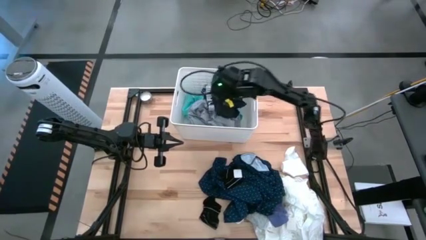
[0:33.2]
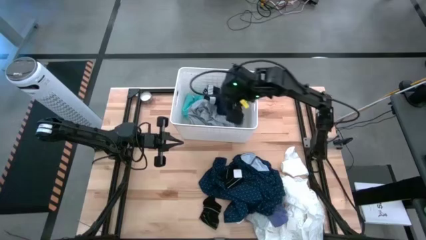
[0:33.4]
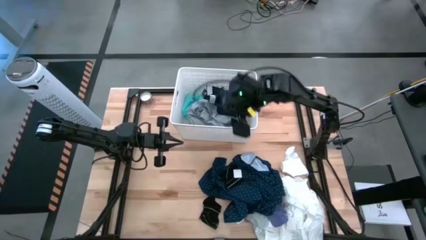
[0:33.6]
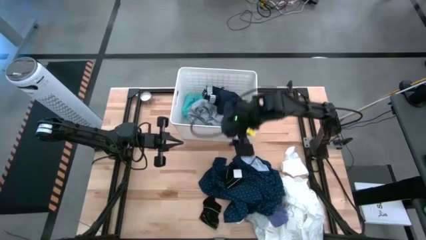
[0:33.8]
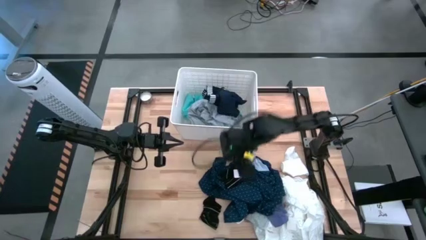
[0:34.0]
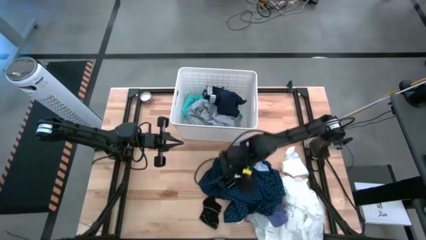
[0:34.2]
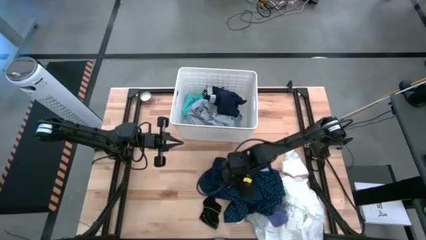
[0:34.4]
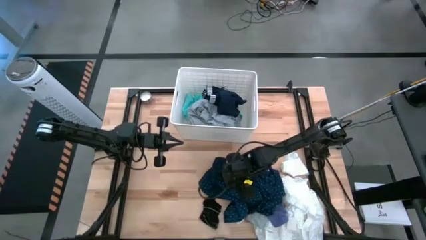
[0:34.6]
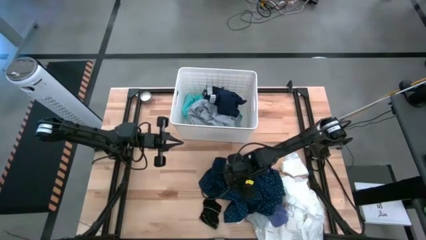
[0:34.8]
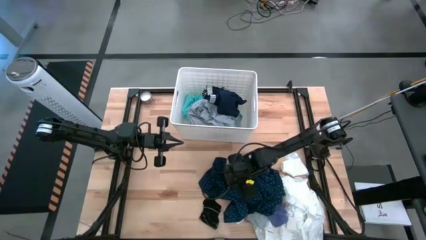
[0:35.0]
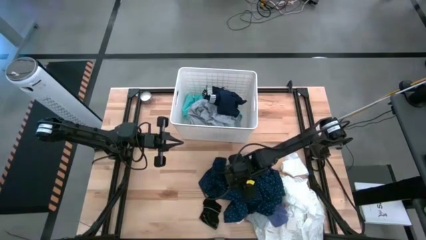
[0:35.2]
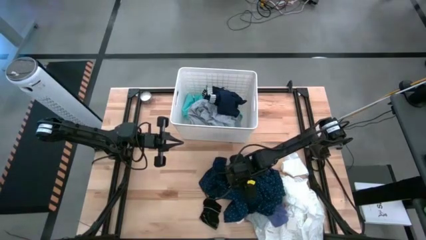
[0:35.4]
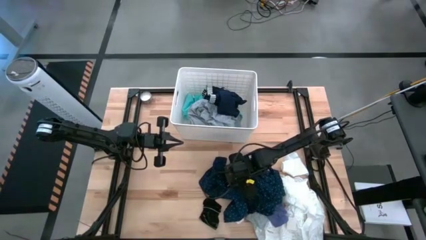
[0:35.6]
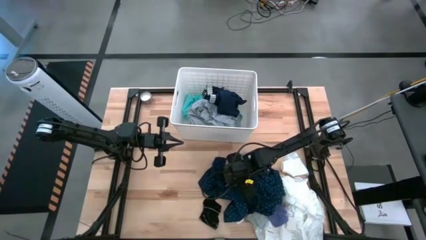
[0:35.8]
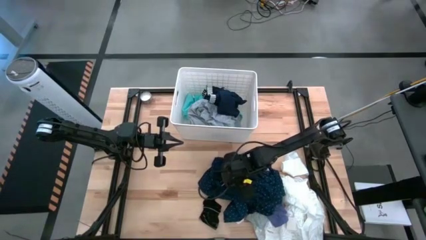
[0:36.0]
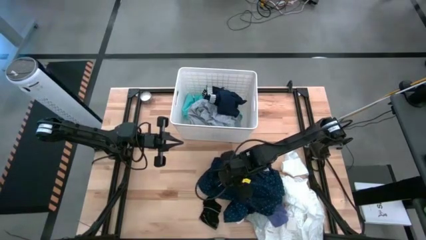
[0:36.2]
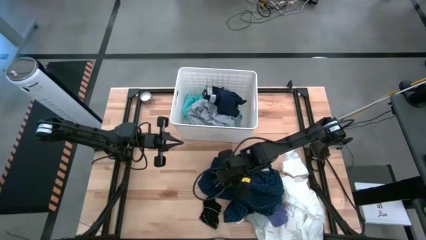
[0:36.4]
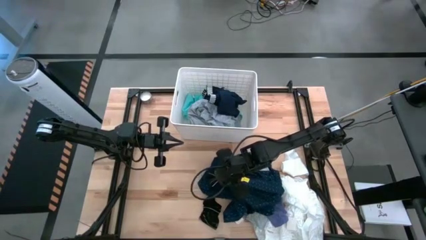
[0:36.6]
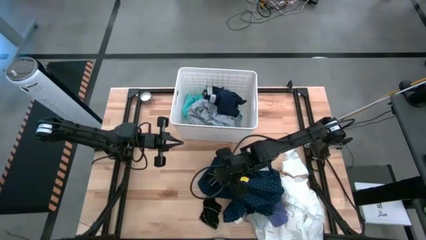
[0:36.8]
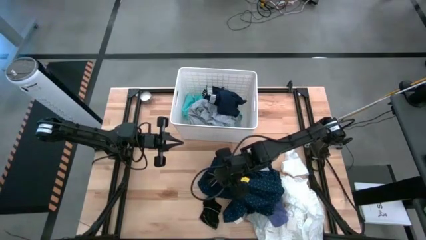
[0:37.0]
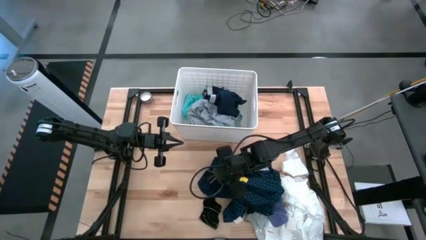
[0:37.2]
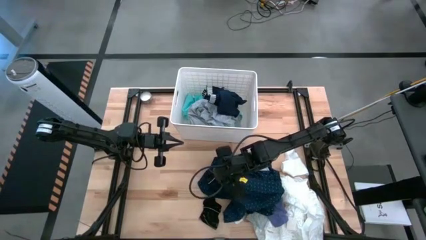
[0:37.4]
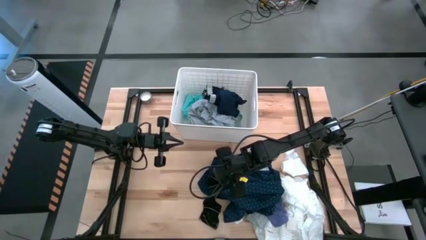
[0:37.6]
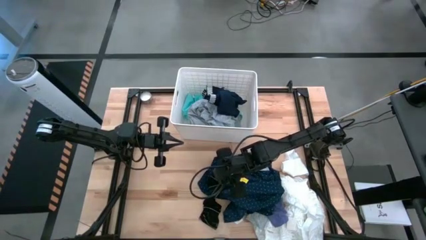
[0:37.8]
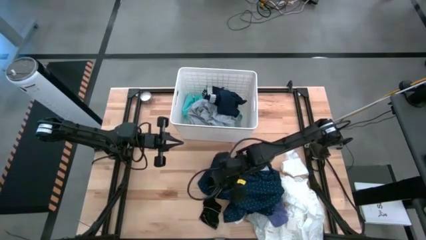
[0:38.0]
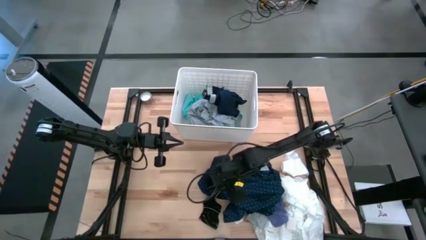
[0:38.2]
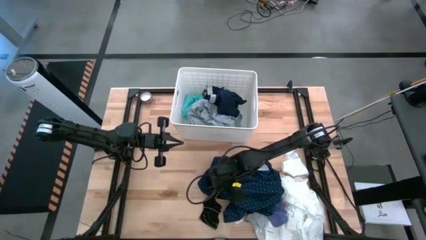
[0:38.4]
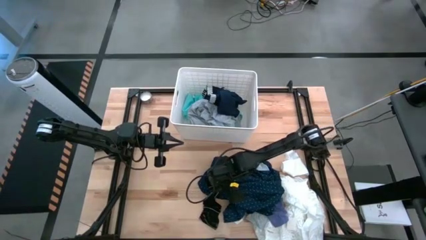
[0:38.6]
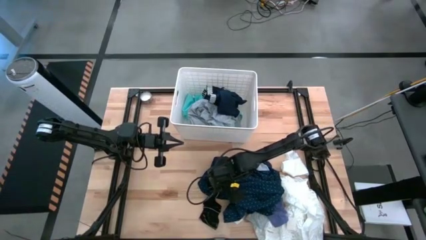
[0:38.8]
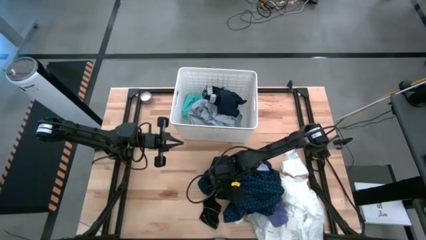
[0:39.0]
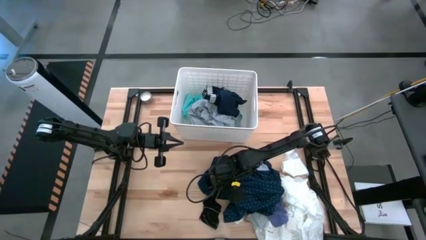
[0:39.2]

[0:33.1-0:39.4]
Task: Sort clothes
Put the black sock into the laundry organizer

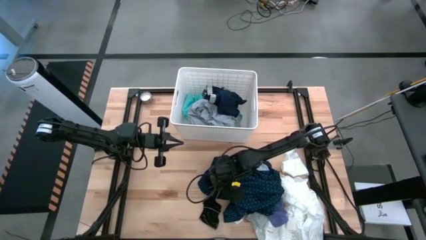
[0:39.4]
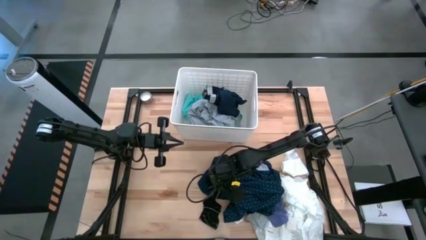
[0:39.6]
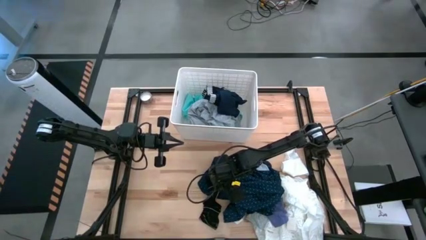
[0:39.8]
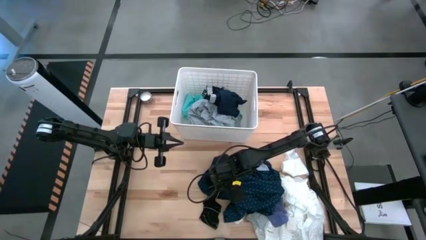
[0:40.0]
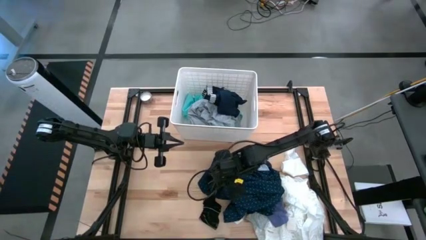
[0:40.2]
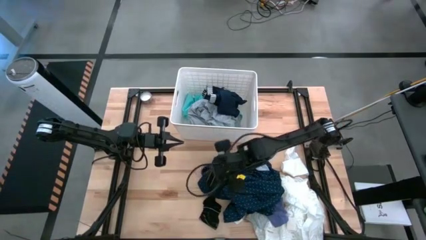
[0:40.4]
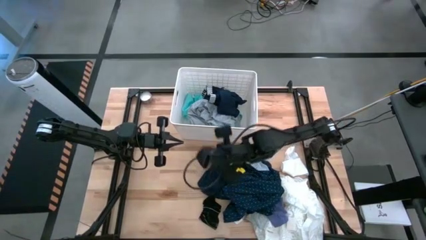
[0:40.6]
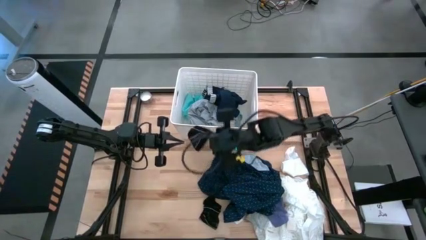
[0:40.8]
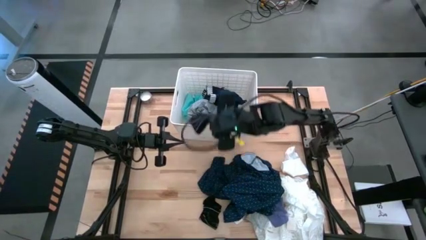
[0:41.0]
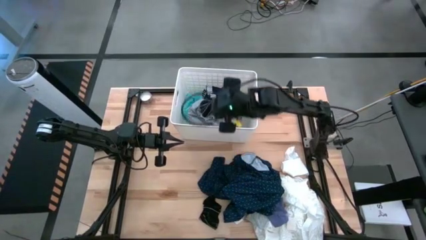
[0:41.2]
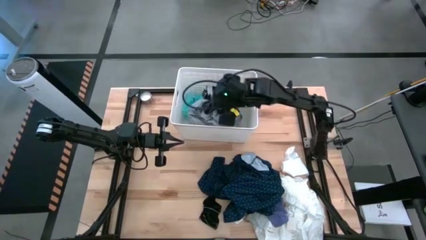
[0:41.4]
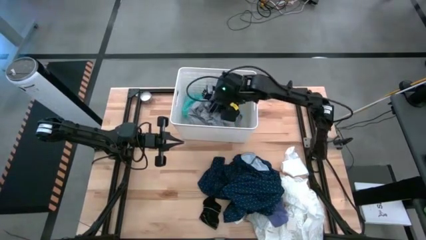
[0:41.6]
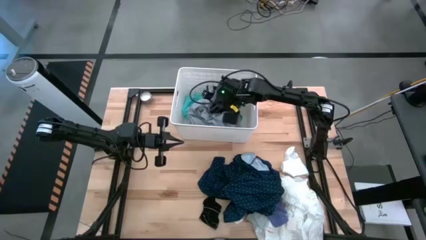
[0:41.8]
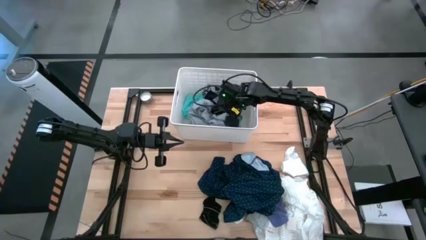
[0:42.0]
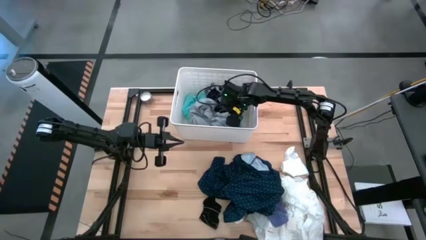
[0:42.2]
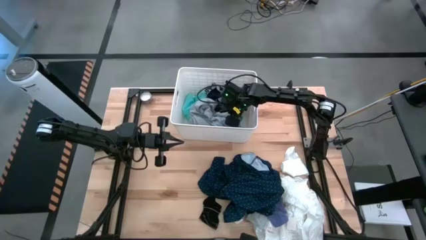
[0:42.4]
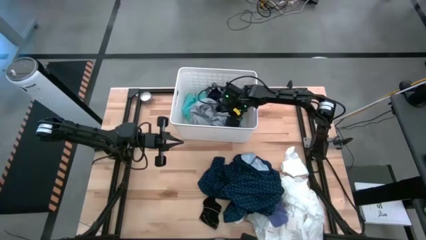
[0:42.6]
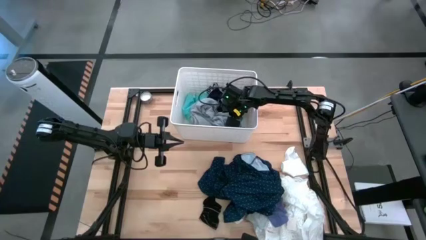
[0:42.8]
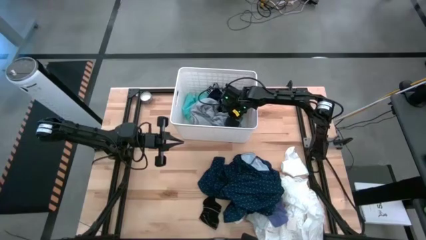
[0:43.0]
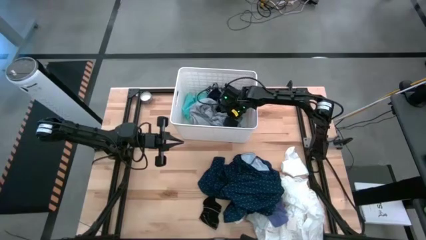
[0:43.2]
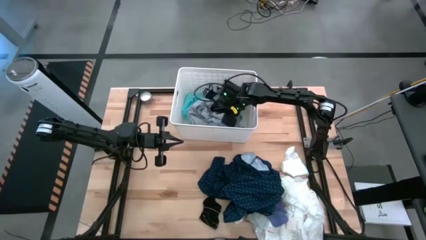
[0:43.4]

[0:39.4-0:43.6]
Put the black sock into the laundry organizer

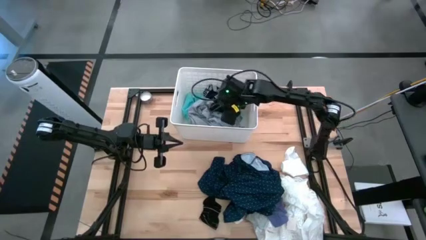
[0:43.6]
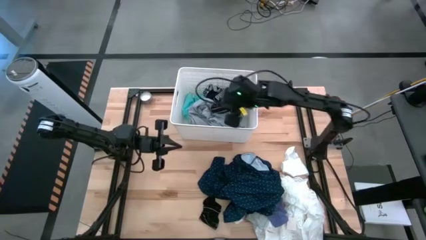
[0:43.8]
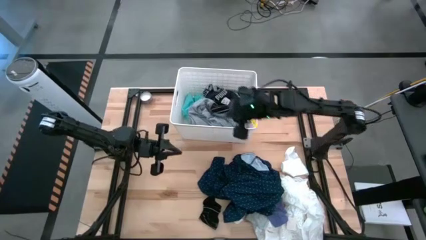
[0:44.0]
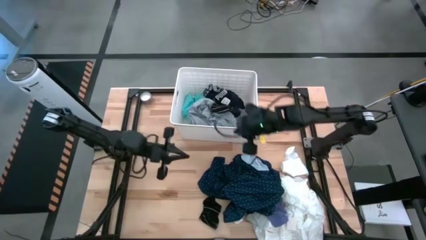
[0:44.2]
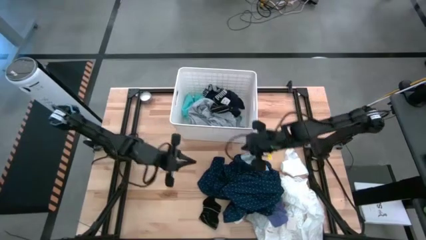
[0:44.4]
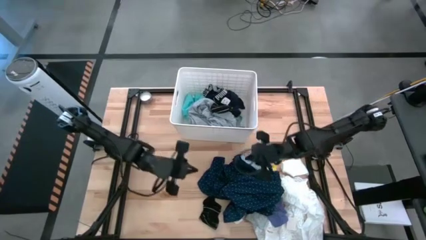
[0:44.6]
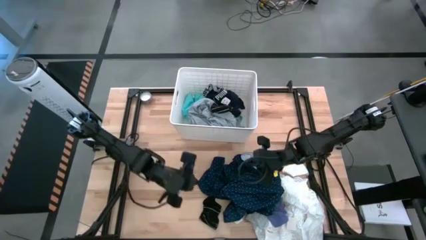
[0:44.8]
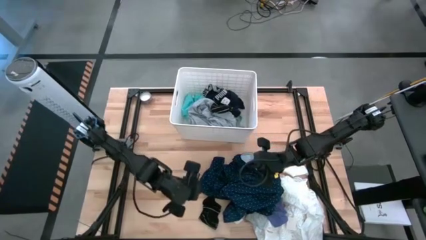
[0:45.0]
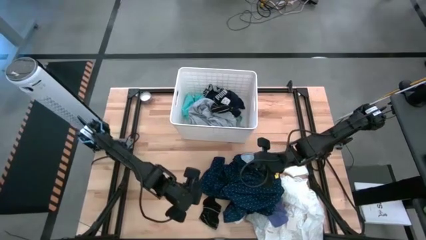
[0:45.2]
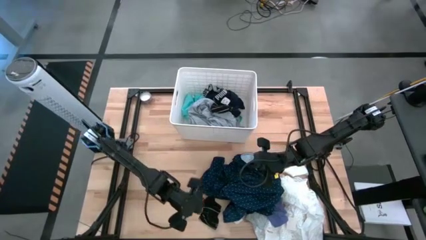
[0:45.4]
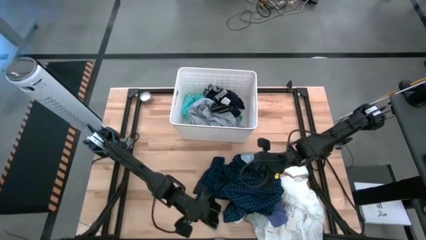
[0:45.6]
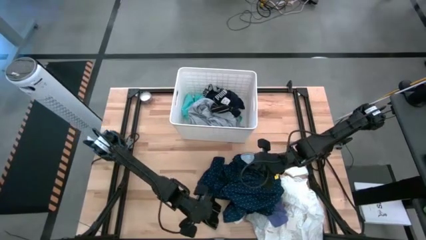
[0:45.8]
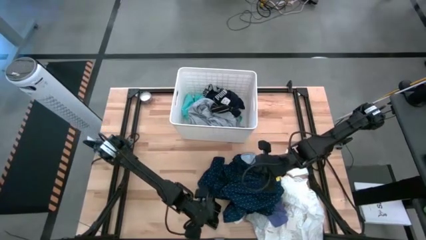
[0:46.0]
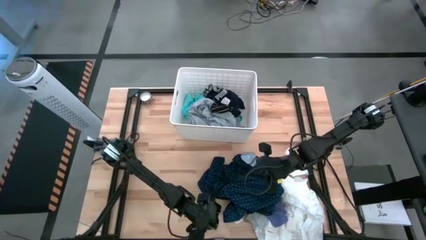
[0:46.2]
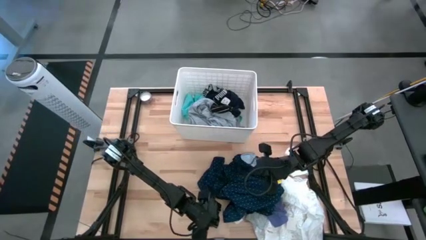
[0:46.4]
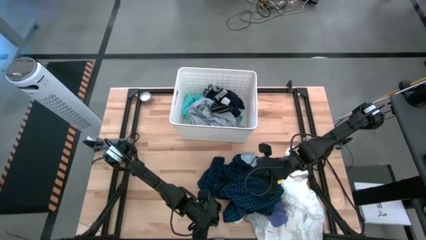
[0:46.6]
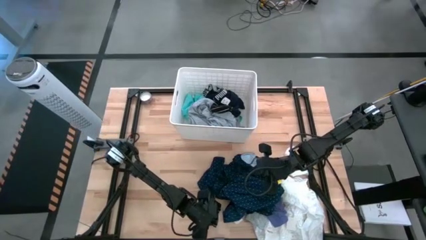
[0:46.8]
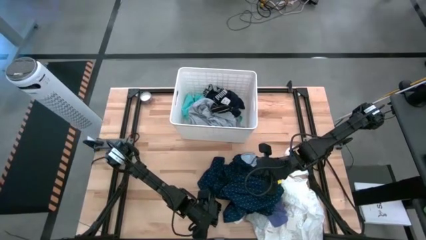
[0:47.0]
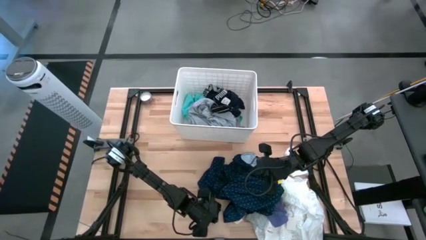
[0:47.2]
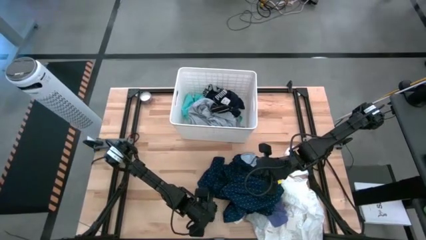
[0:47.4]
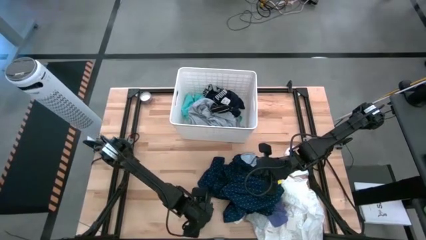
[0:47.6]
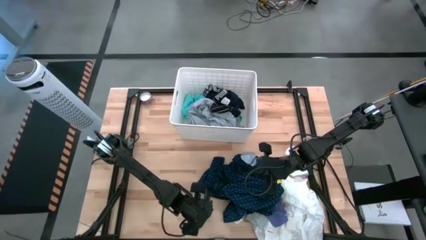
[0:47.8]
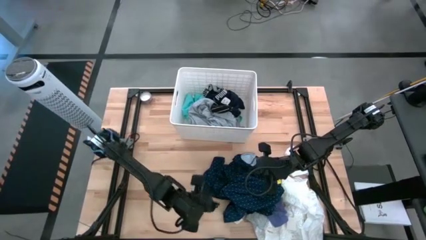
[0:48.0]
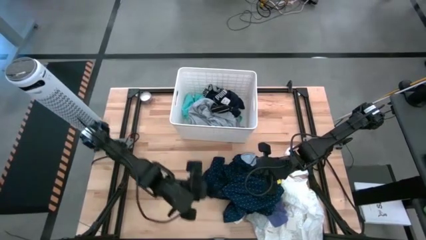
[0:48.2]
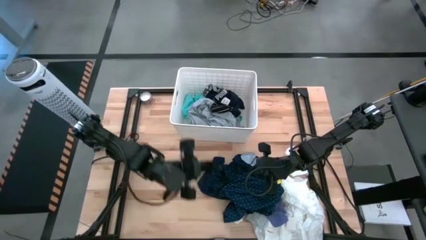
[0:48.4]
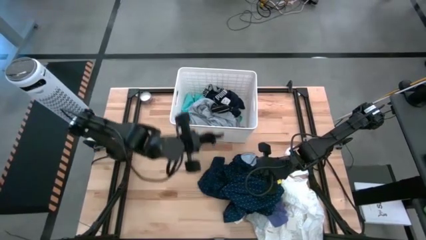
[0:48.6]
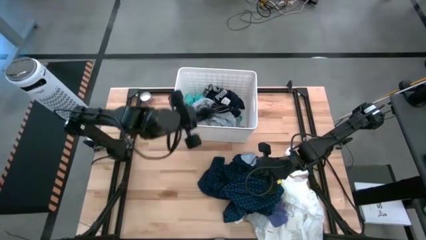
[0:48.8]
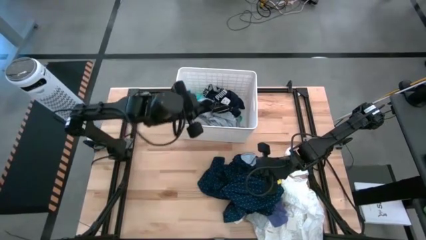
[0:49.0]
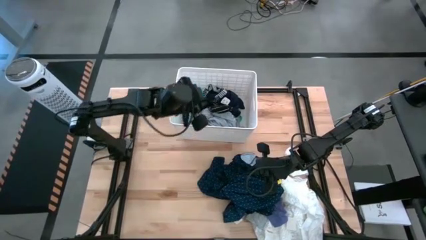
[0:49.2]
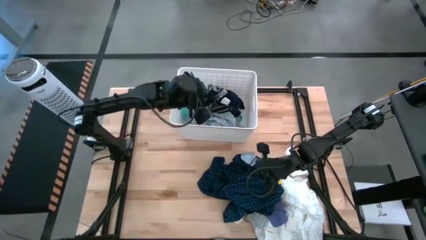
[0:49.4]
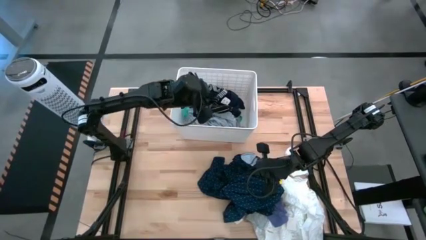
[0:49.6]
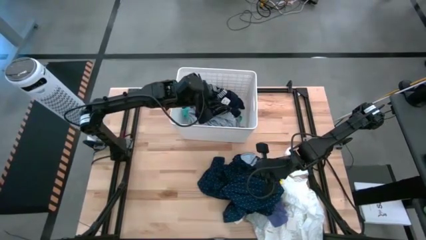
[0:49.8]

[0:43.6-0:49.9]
Put the black sock into the laundry organizer
